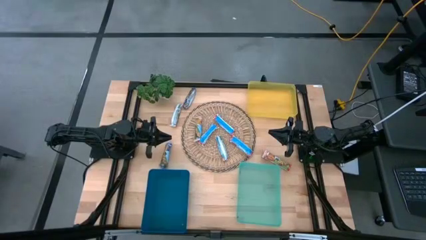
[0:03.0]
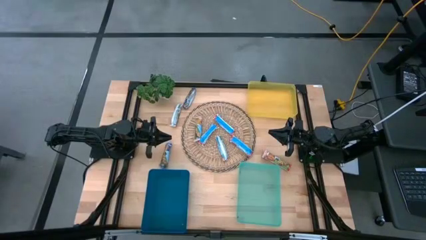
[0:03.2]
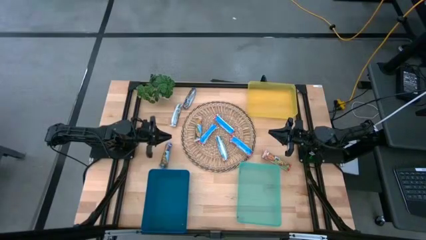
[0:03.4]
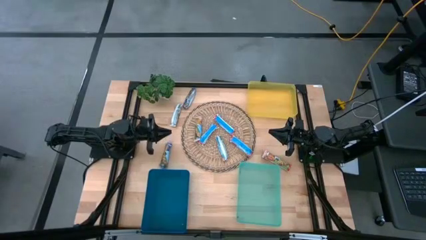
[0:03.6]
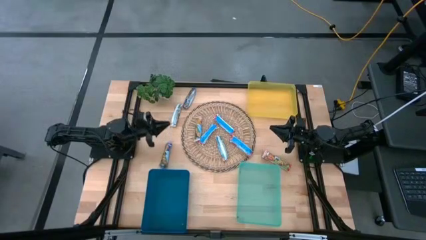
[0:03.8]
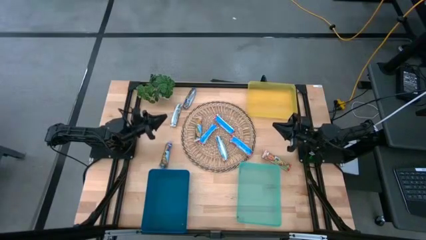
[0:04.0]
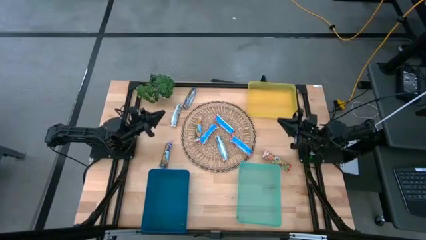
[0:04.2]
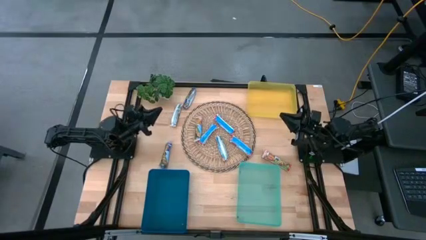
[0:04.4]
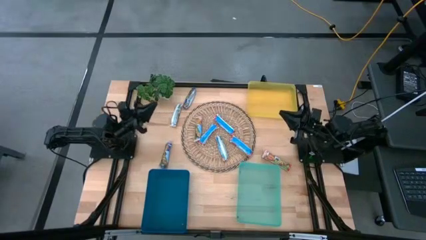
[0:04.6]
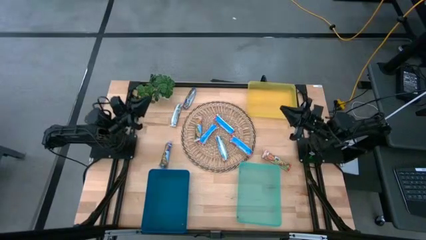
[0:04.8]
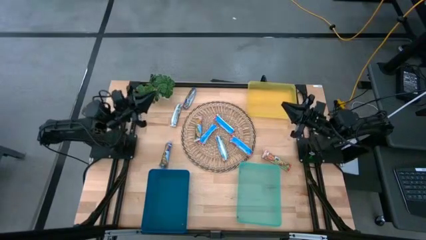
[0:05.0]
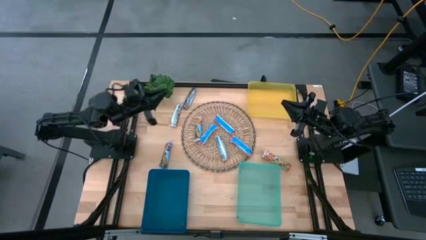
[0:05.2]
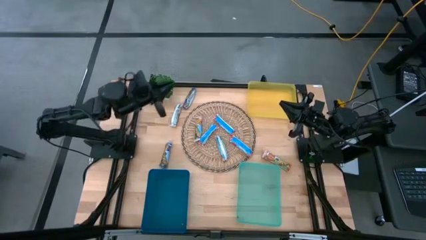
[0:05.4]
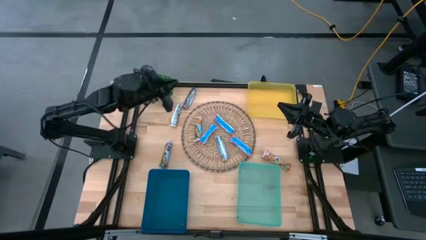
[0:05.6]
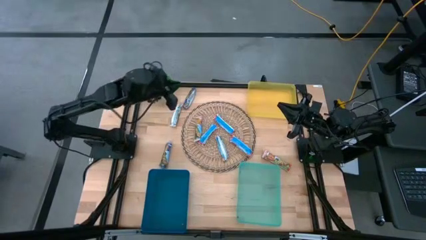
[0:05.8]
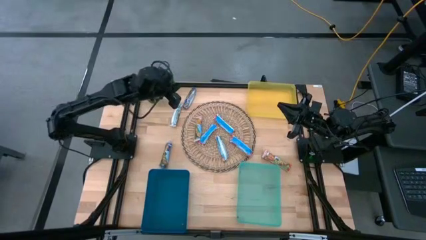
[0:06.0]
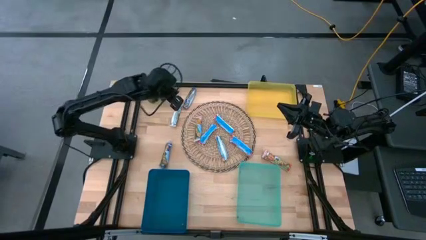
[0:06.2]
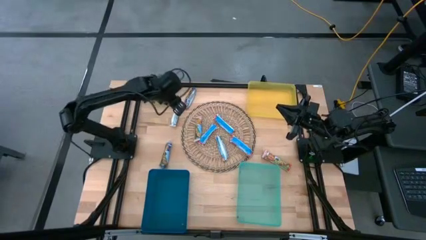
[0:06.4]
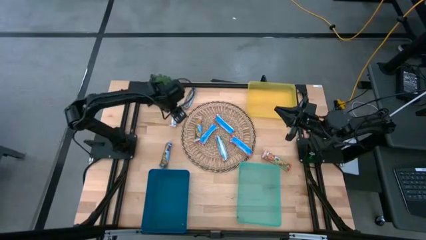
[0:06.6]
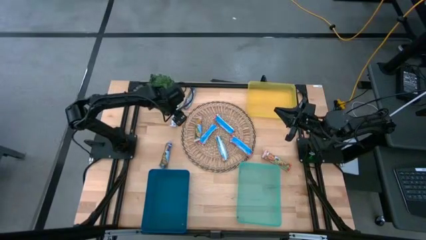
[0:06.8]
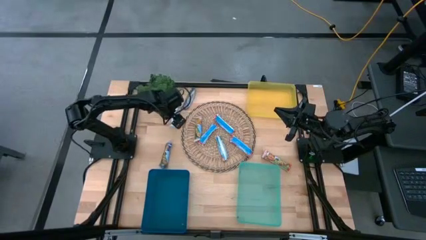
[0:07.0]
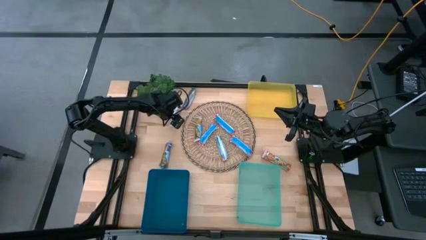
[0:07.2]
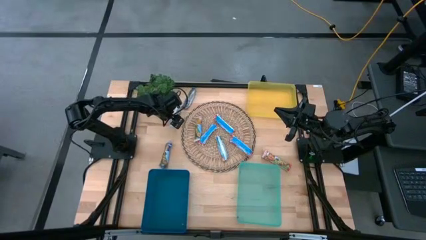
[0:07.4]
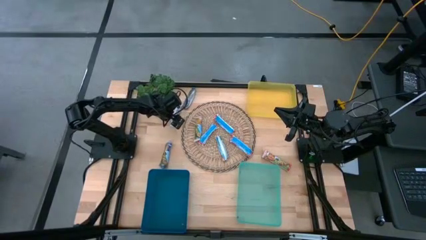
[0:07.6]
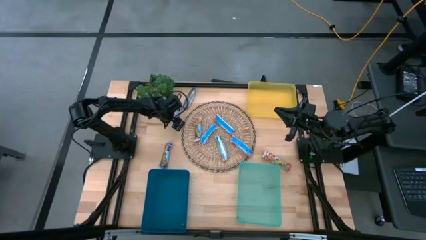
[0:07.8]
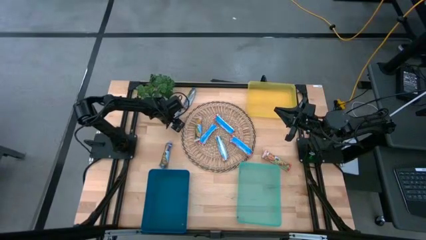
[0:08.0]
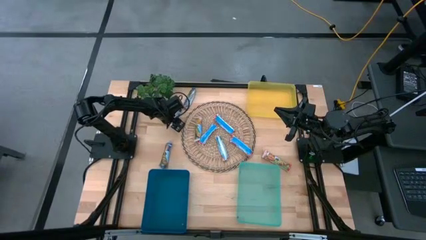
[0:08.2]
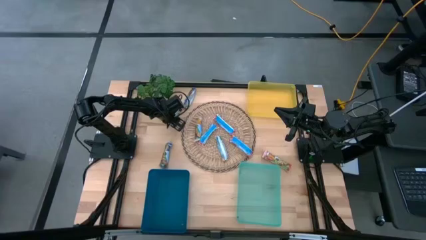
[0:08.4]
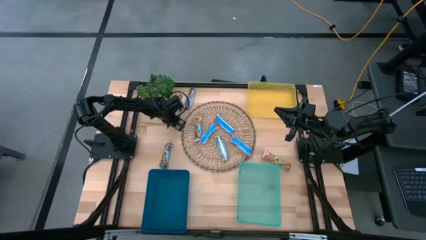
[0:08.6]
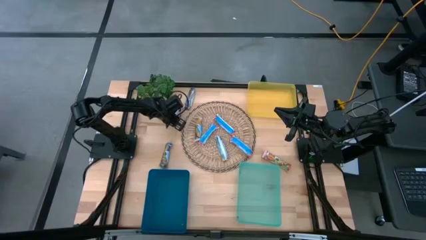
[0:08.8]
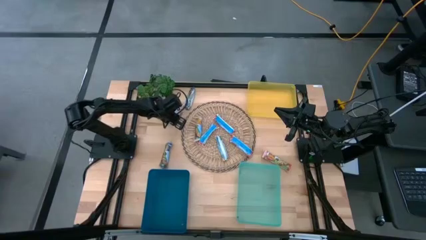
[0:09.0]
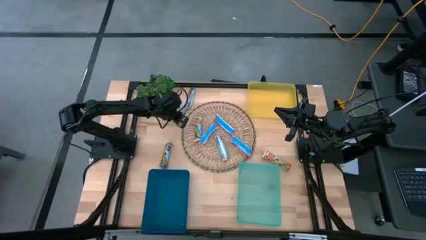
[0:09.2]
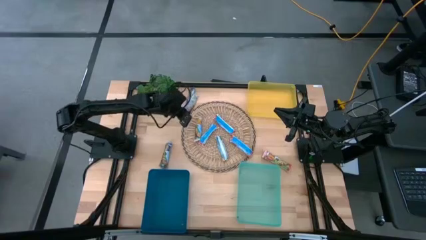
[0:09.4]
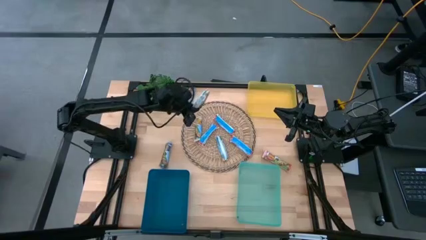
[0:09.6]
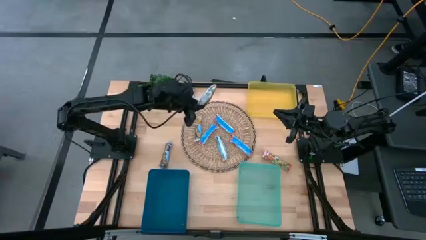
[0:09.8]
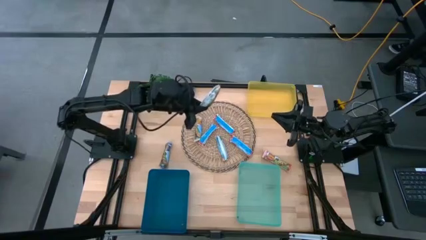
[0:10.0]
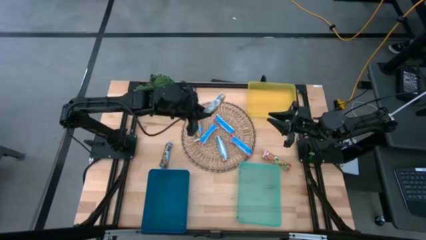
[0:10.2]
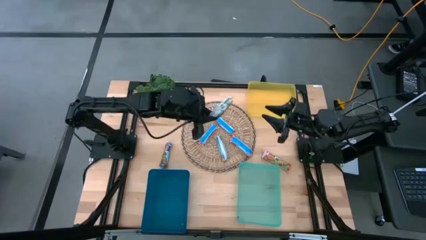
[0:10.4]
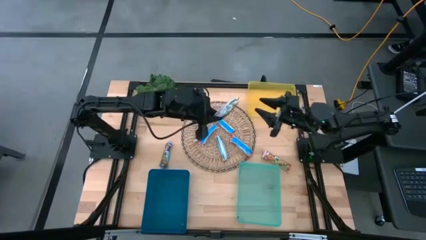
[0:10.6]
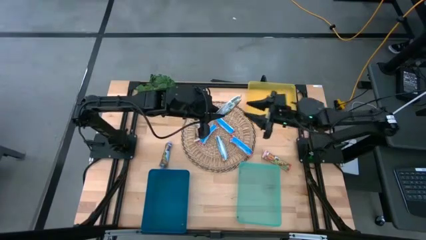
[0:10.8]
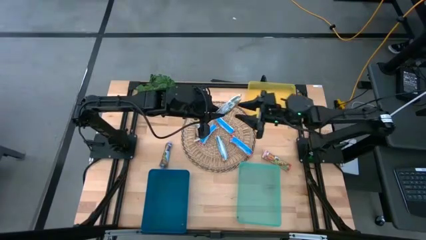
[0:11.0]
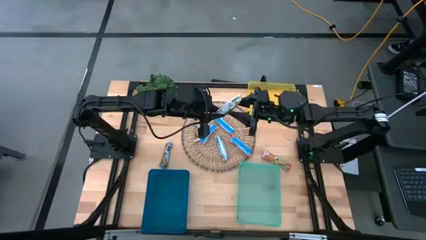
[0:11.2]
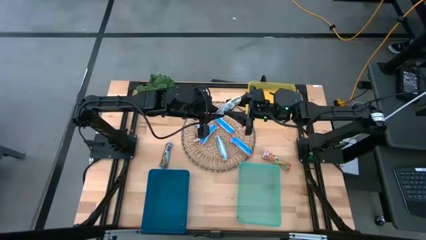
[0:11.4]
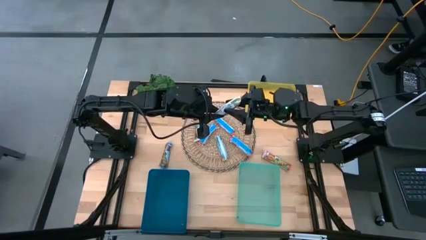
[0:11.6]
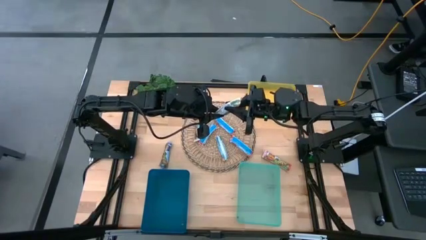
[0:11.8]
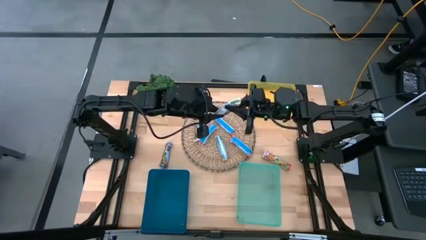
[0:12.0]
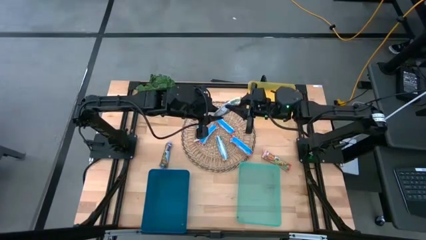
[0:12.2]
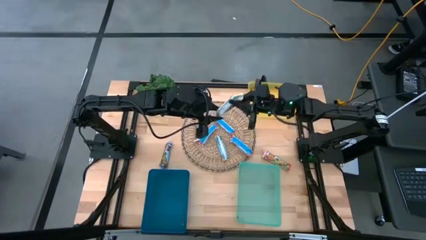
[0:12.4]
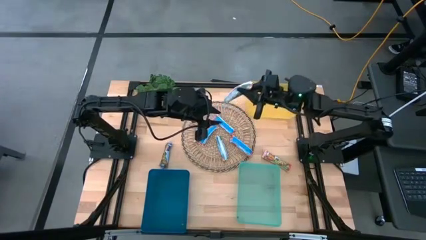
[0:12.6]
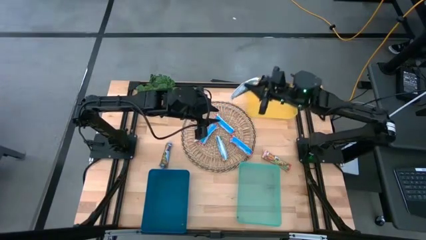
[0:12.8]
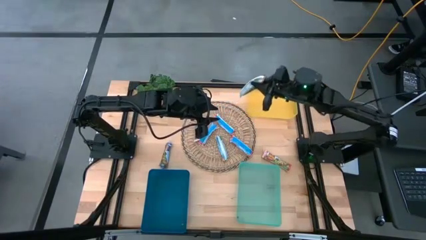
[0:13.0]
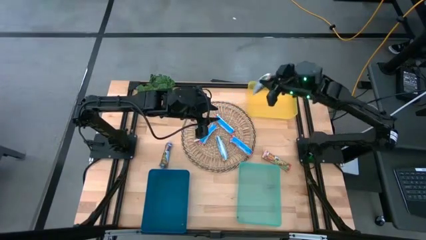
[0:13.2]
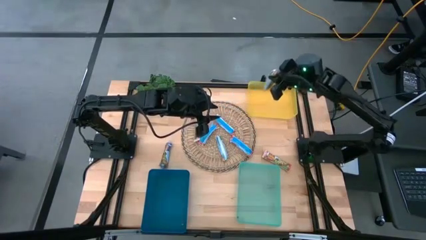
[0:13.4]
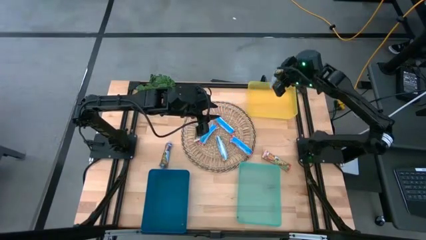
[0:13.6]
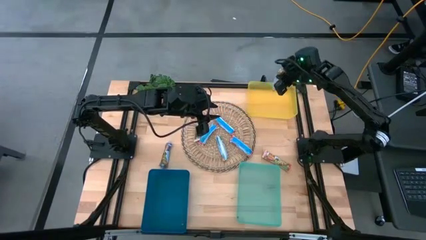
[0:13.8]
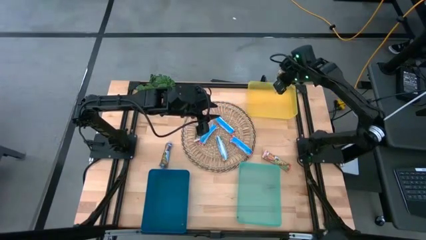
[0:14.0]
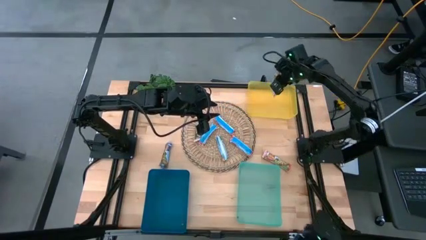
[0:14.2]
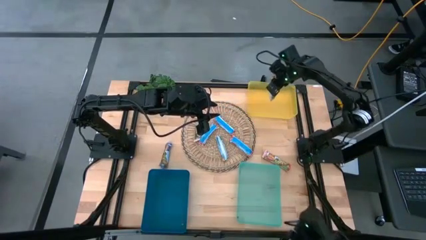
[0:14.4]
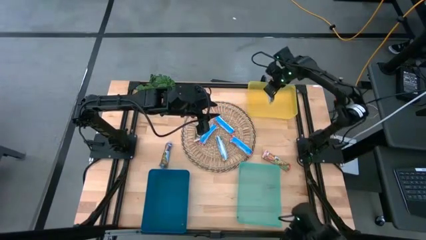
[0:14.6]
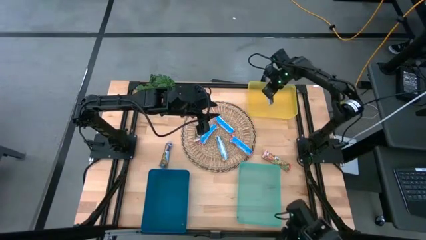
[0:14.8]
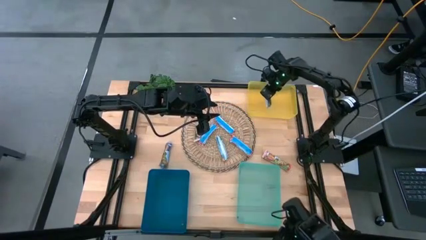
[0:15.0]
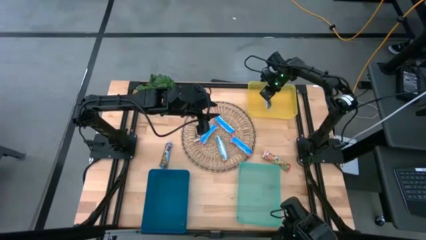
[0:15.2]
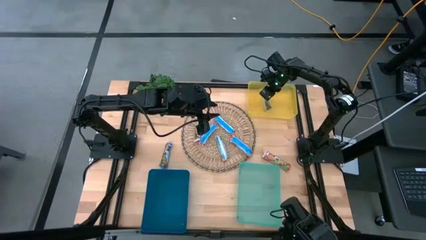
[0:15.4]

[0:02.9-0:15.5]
Task: Pick and place Granola Bars by type
Put the yellow granola bar into the yellow bin

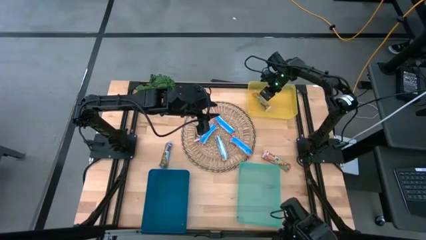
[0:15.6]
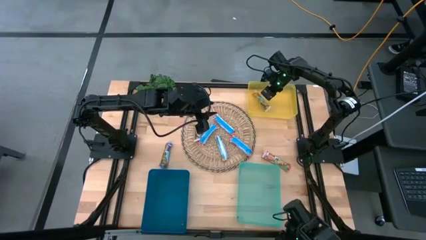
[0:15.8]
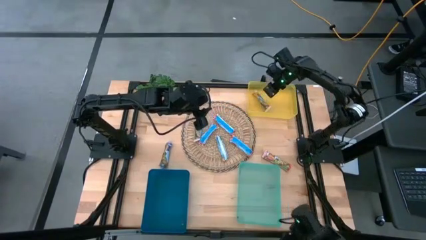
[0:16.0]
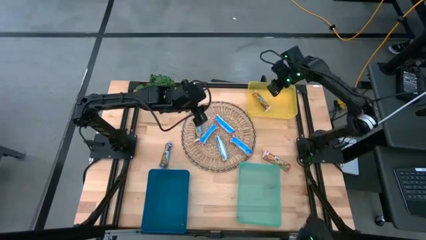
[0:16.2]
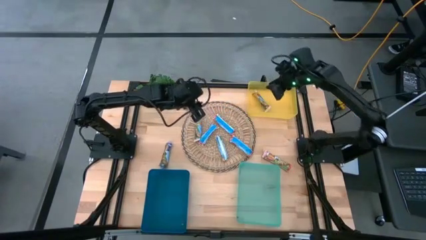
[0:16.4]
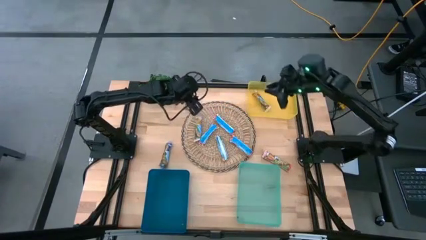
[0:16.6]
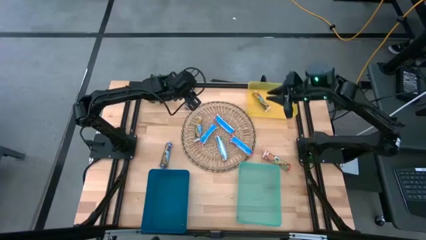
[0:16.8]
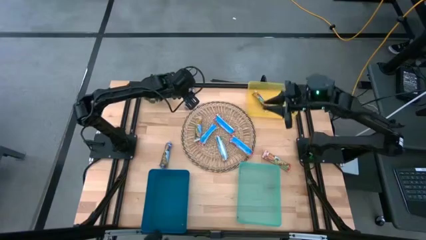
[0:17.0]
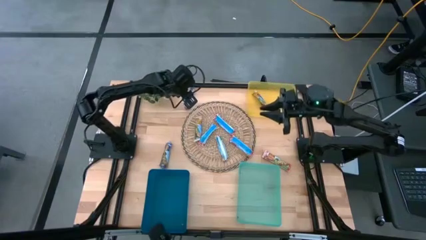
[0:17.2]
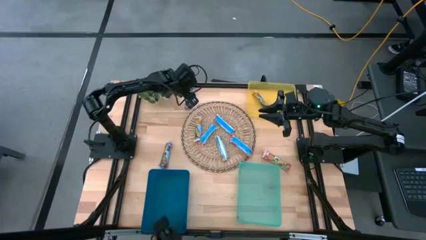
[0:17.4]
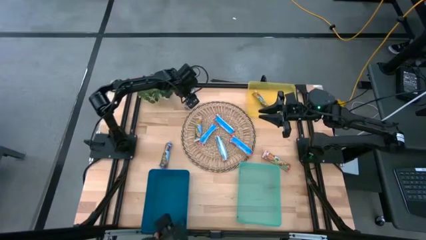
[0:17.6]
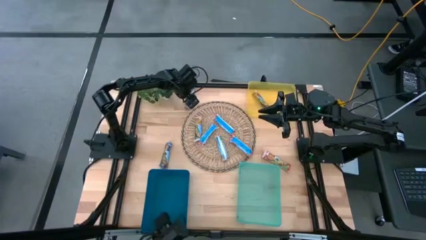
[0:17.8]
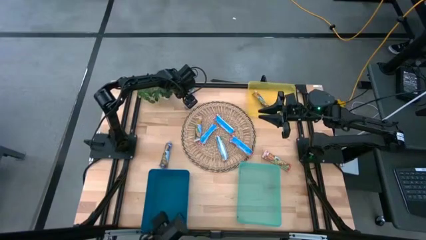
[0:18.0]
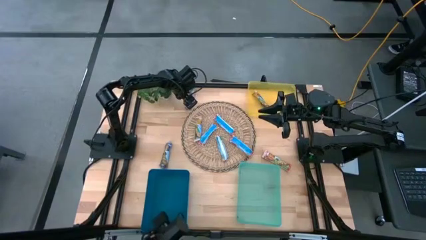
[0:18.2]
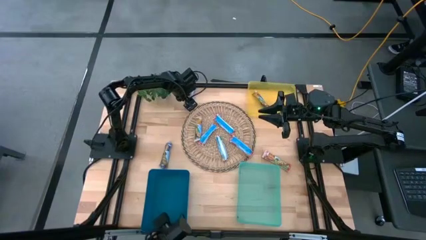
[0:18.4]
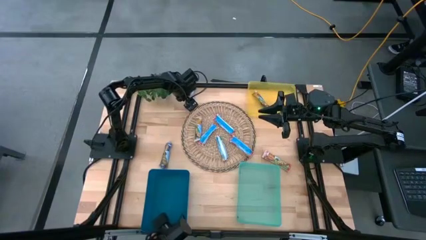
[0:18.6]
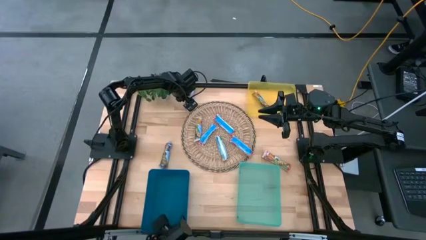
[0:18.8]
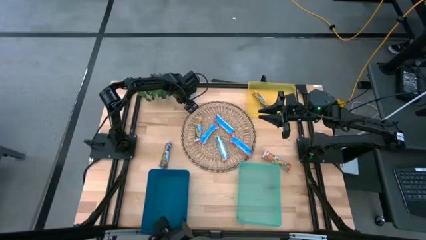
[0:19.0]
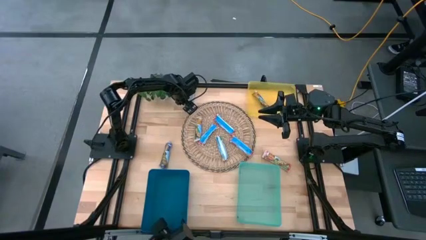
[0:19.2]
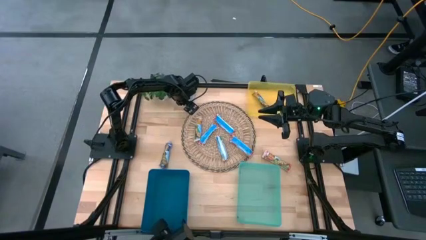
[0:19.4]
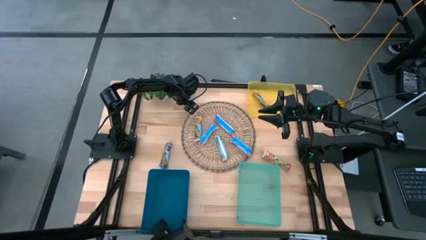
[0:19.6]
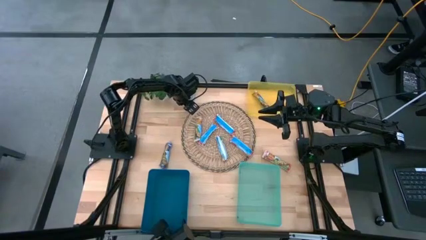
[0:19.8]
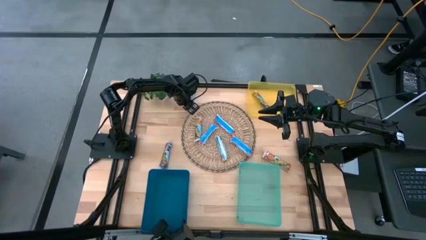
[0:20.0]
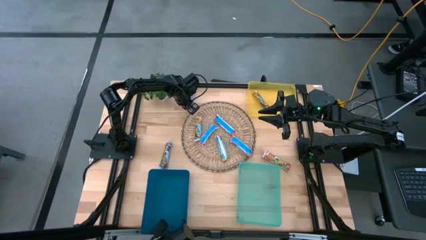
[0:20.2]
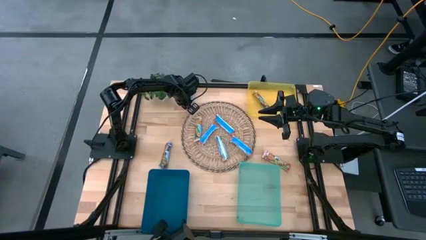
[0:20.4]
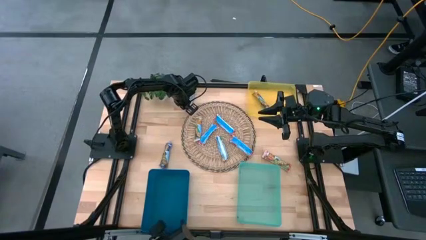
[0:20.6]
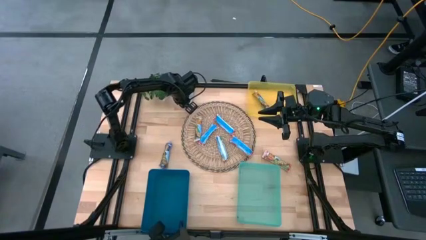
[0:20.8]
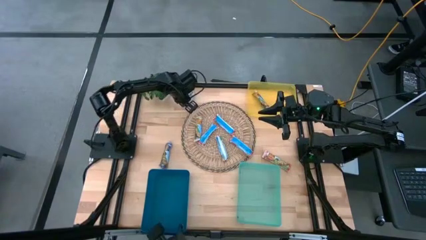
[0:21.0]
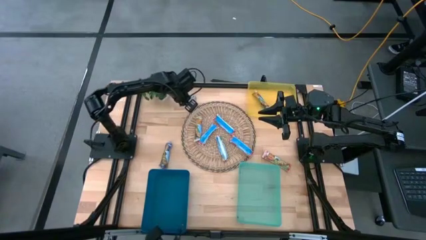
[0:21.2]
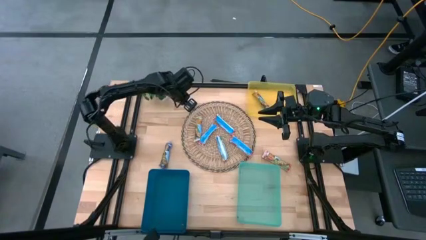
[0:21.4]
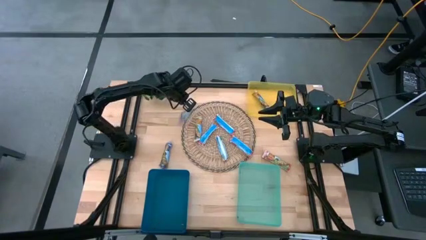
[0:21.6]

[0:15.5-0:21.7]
Put the blue granola bar into the blue bin
